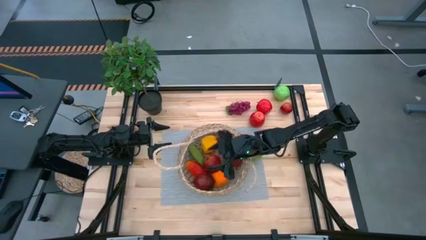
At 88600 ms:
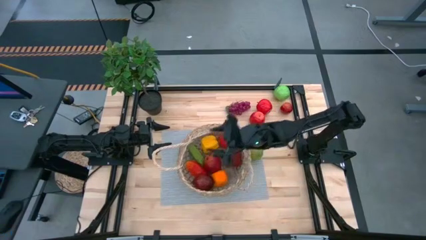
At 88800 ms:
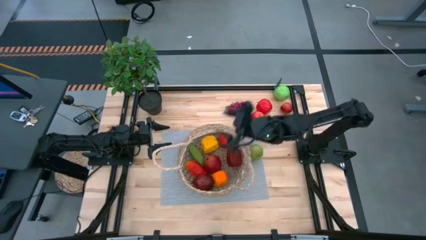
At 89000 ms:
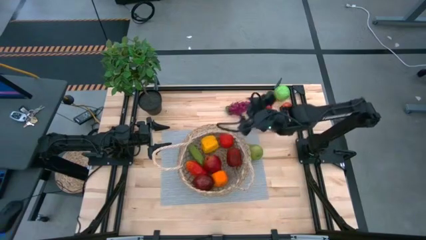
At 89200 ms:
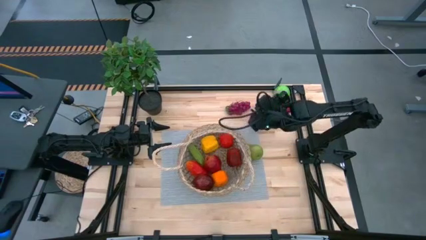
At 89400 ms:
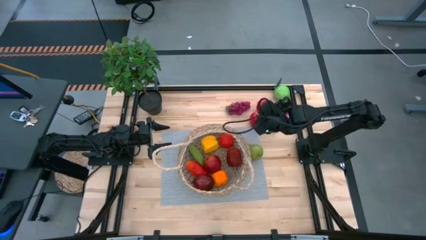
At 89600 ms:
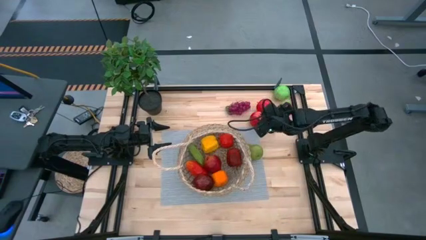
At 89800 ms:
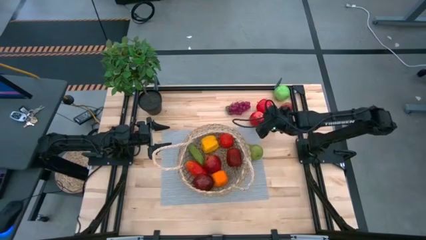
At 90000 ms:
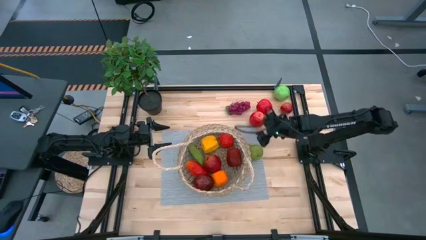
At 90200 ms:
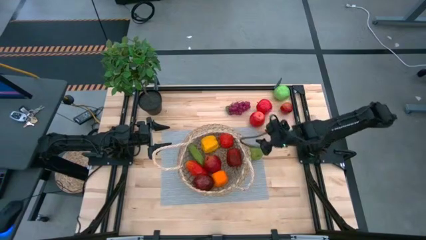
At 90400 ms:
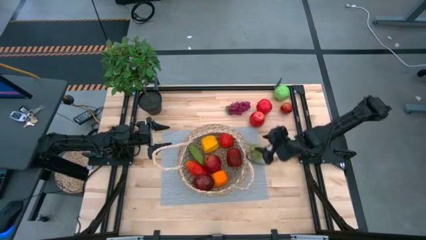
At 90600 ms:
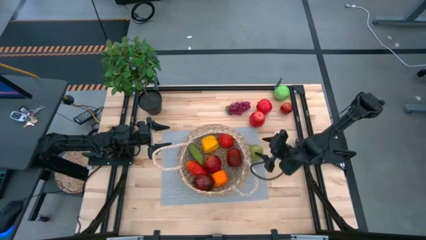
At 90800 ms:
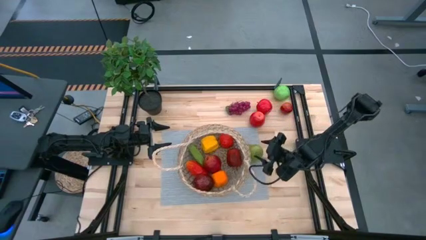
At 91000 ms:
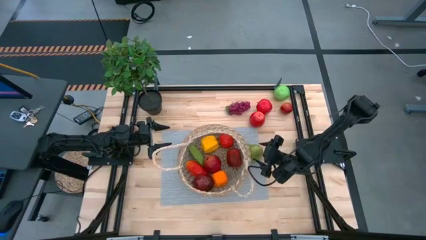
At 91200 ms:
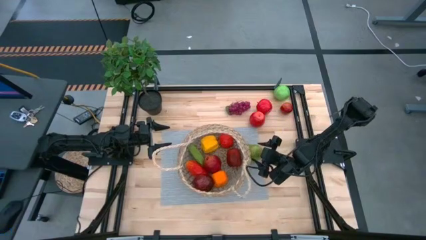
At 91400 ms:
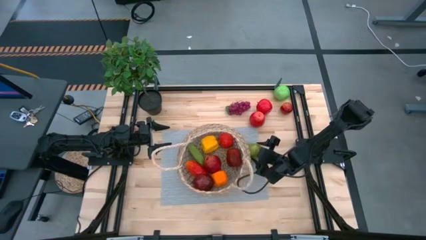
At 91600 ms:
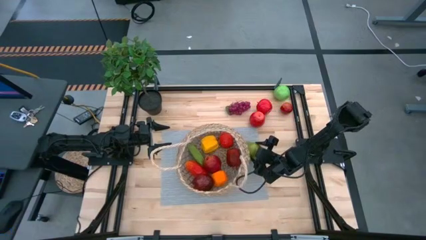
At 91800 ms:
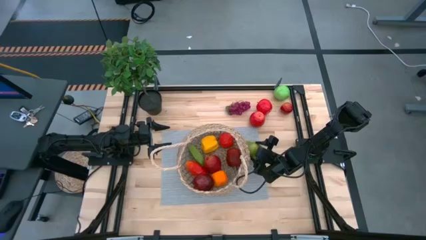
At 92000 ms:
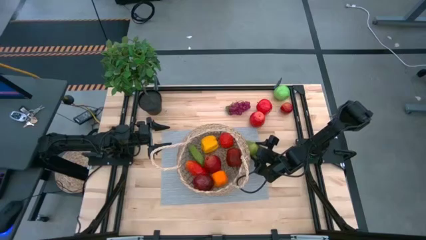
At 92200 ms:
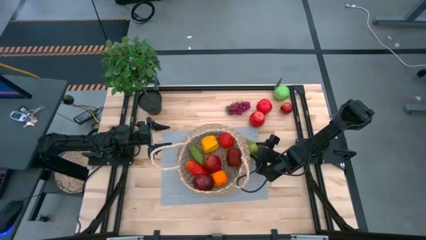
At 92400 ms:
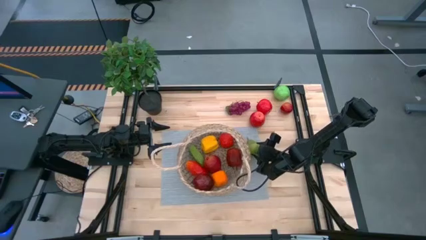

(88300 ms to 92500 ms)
Task: Build produce basket
Put the pear into the basket

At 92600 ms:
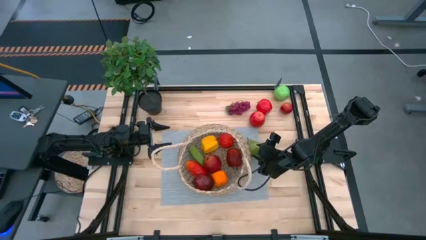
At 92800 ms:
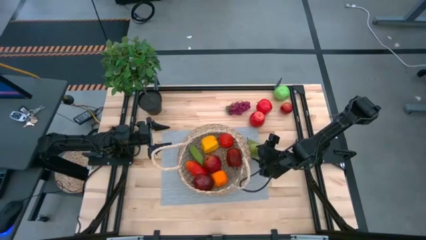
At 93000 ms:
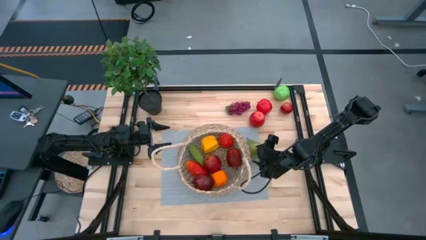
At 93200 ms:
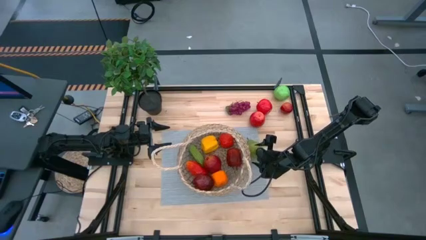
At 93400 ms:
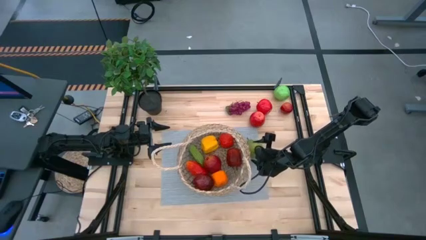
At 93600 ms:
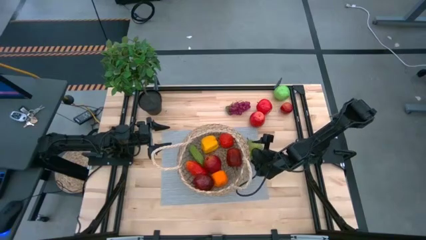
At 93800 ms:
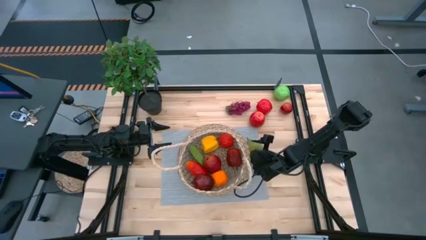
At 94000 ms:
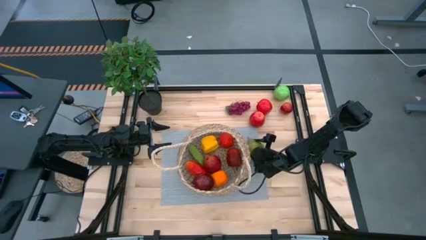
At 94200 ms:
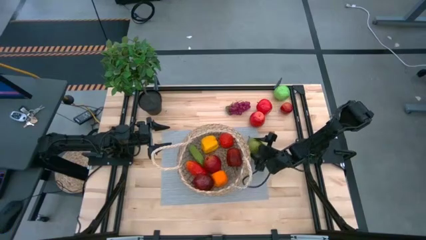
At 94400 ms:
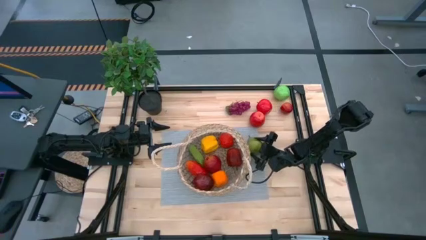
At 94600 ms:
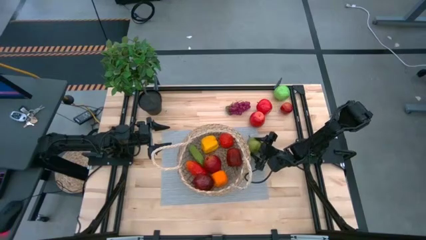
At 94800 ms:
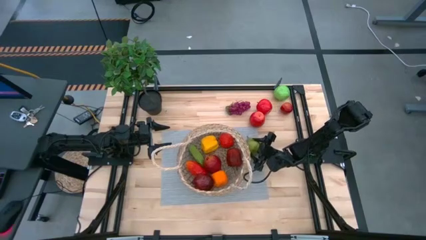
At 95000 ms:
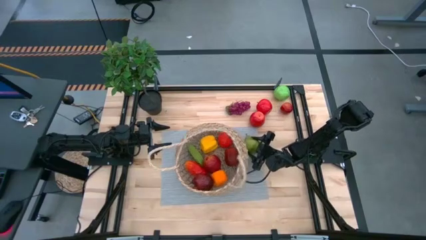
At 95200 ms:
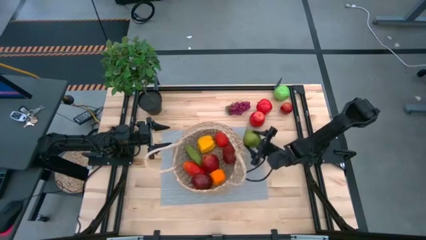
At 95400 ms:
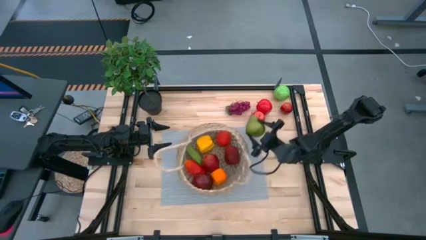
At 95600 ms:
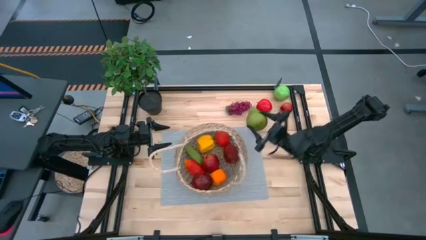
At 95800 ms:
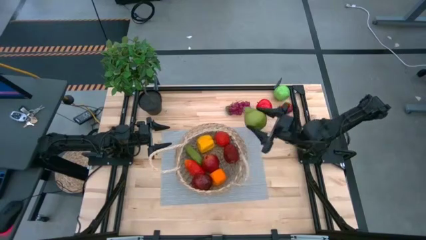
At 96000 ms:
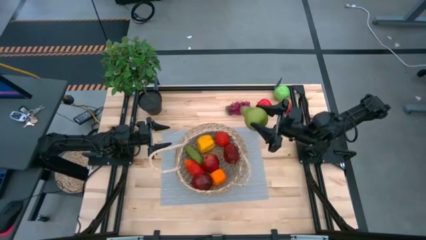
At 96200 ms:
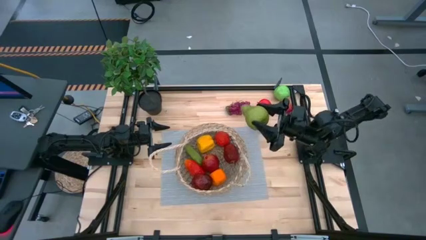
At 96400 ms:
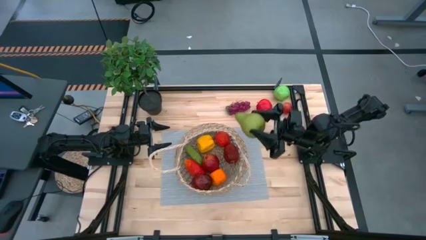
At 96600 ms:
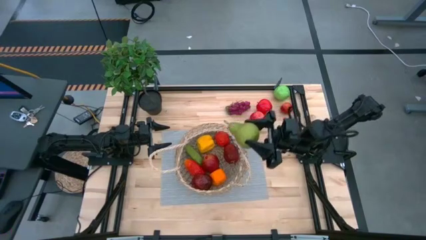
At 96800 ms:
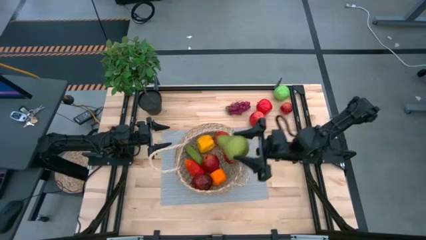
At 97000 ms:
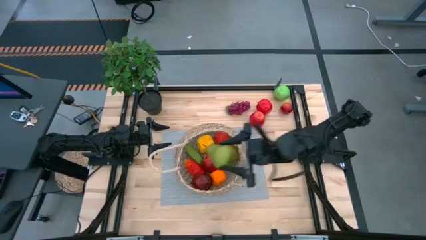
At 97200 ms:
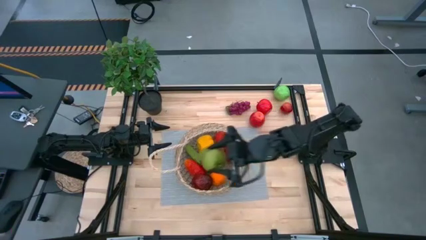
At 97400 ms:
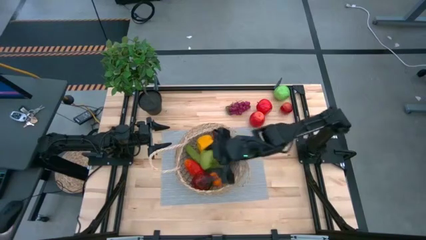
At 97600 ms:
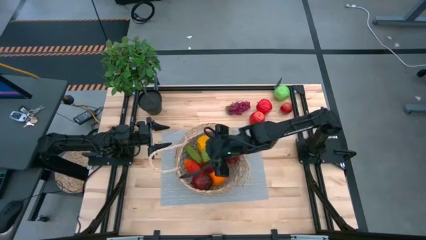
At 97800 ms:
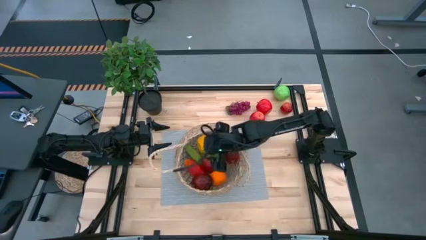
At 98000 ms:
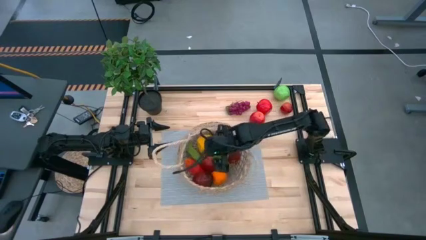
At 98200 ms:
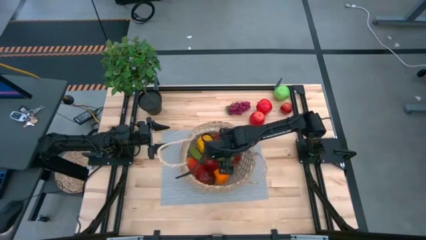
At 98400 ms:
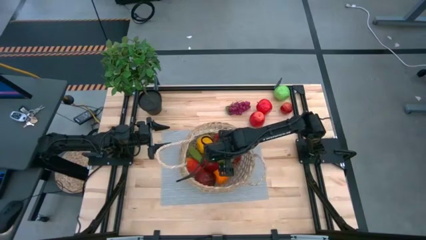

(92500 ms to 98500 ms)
Put the pear into the basket

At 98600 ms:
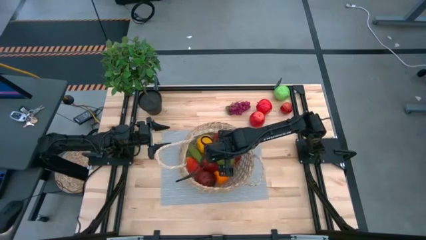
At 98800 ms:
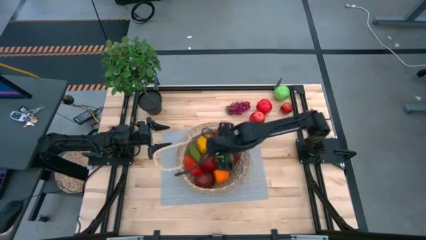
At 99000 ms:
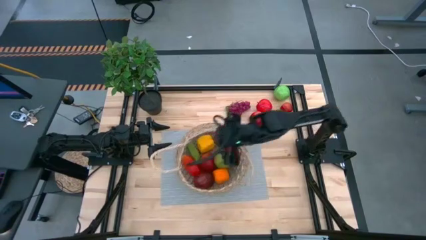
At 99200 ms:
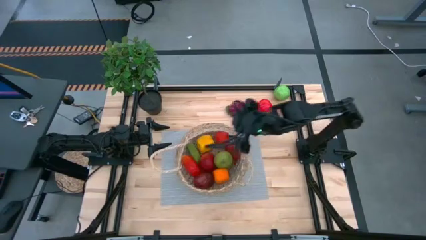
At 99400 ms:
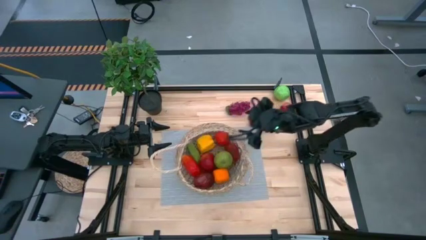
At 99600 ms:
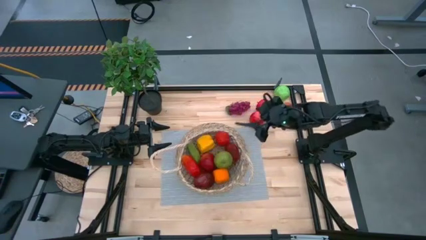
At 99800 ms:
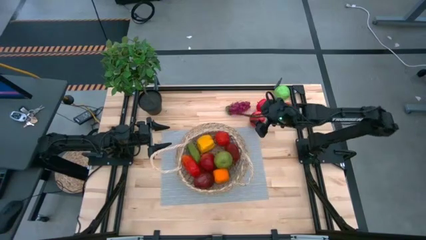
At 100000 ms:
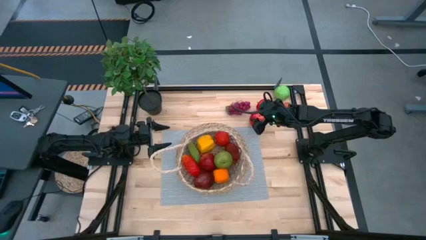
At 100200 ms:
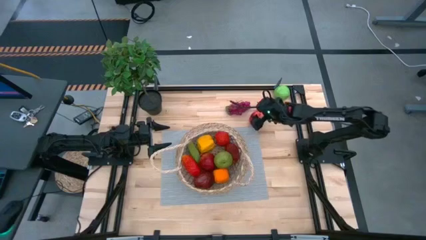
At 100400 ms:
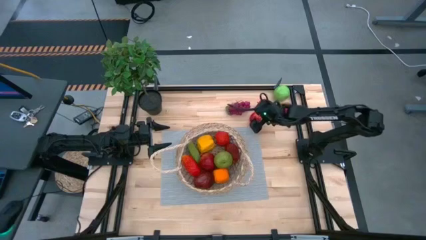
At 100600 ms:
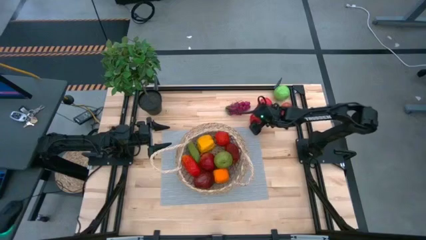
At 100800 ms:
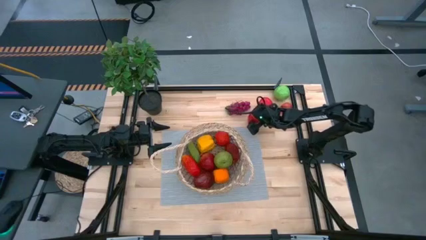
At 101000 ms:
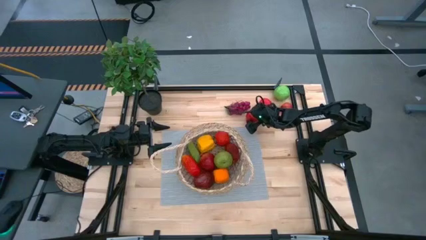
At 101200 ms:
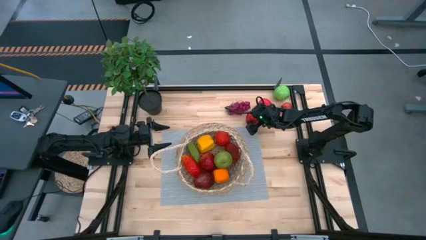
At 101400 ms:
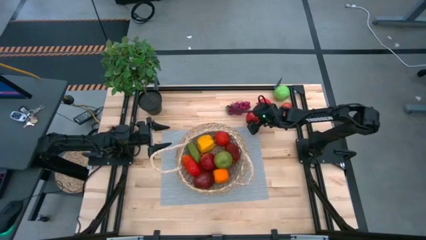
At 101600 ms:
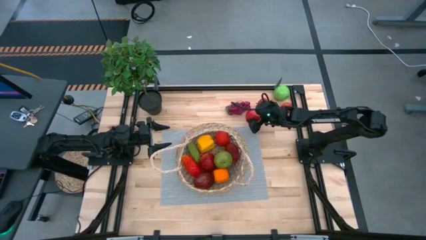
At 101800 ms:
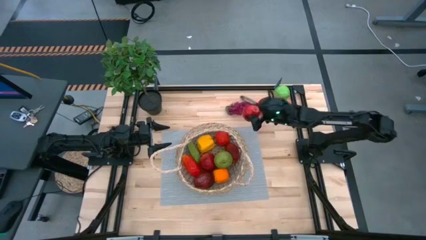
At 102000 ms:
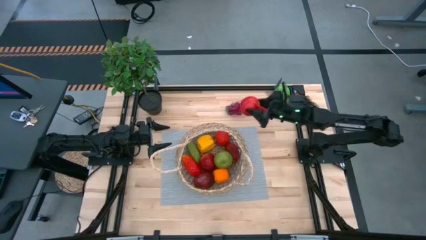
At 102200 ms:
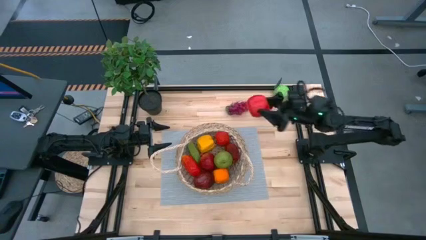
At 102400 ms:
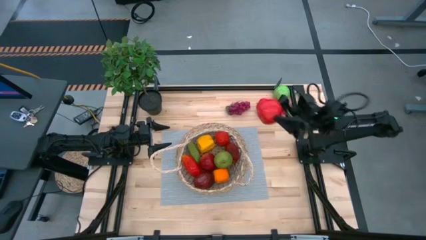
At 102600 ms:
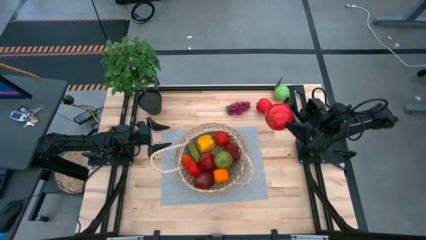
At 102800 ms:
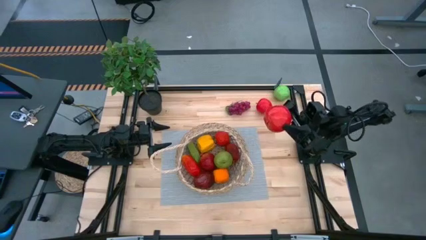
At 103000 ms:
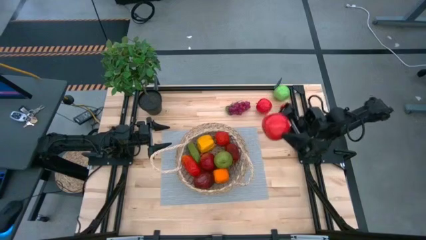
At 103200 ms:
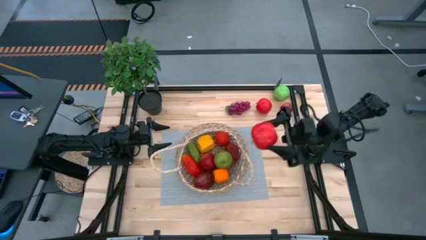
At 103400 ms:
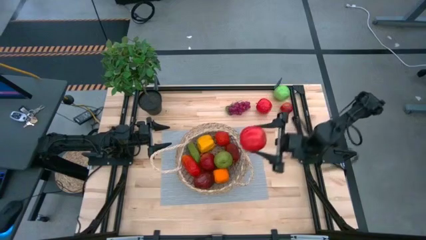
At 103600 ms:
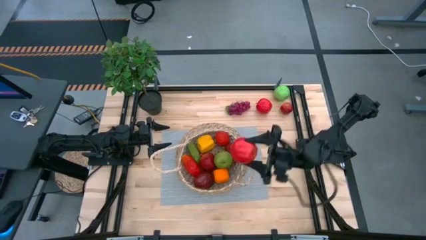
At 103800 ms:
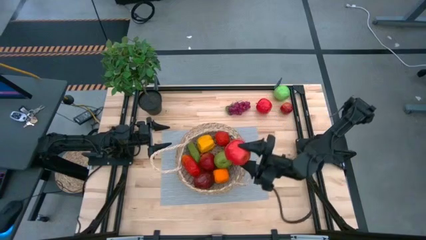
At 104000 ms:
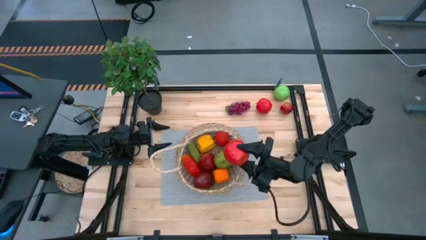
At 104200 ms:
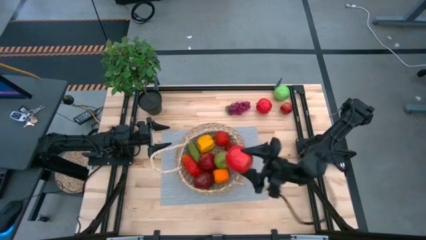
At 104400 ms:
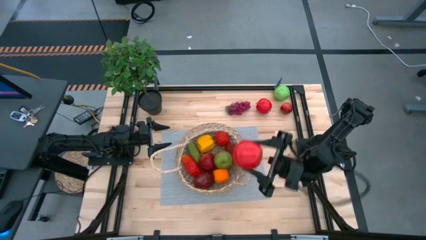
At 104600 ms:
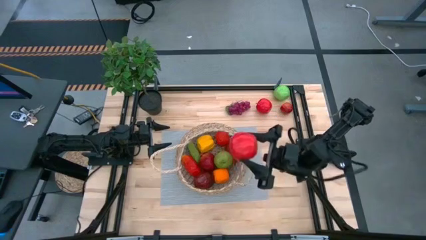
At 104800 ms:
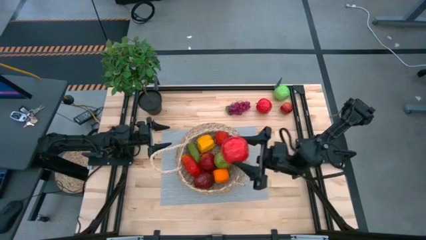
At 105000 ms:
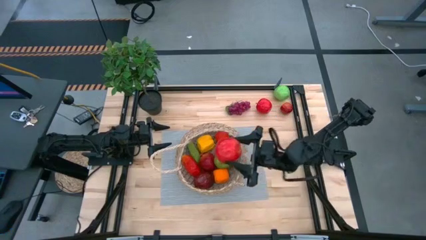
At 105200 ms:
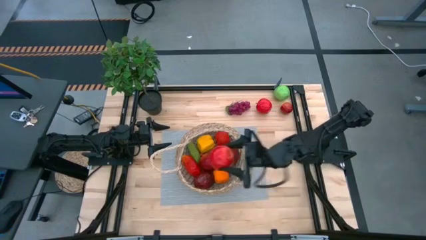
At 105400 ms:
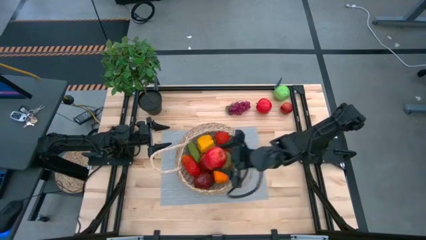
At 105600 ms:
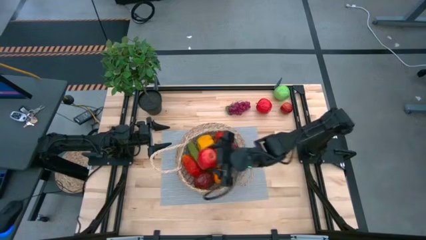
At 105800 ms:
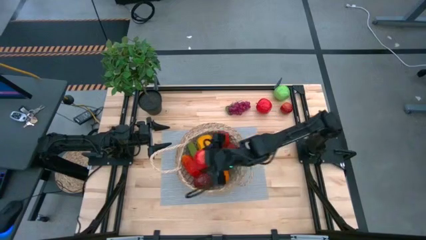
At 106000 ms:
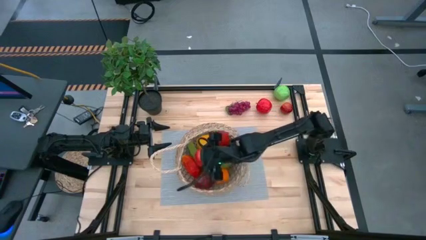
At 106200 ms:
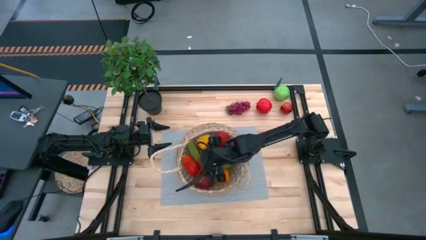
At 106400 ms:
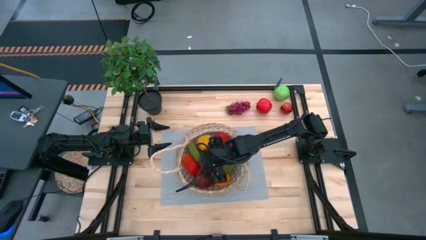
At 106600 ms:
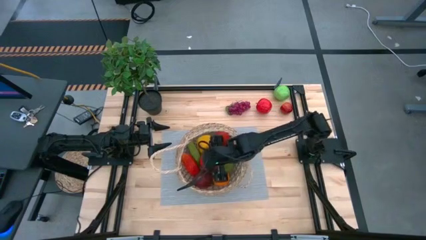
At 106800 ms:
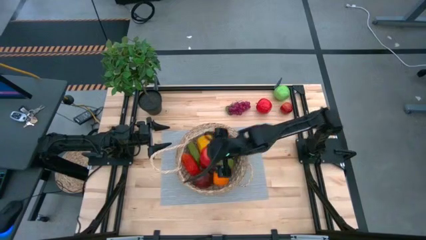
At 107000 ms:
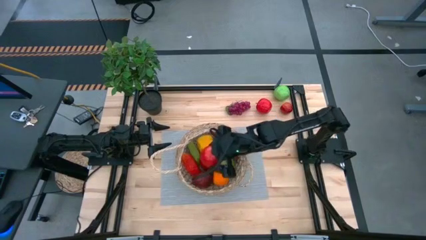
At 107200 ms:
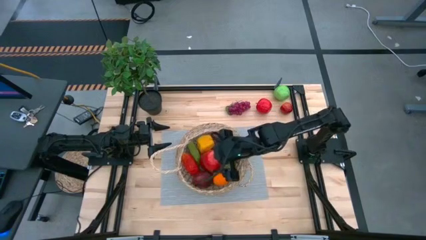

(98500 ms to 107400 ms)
Put the bottom red apple into the basket
